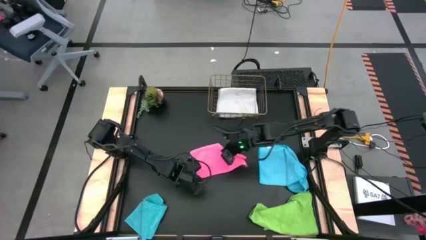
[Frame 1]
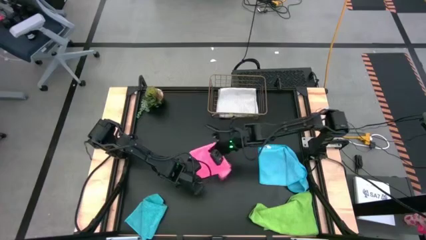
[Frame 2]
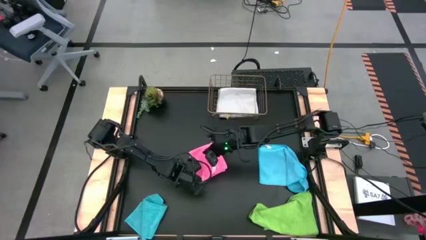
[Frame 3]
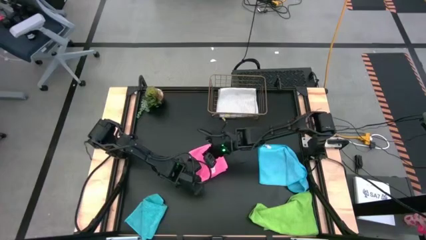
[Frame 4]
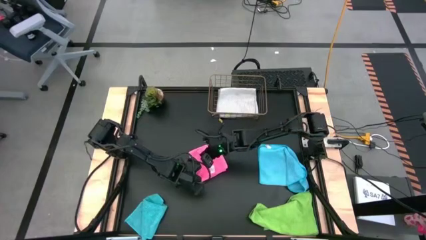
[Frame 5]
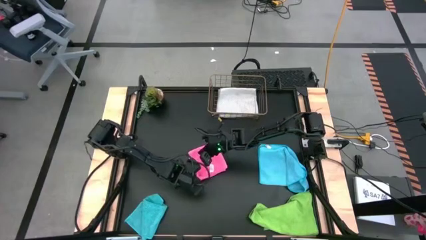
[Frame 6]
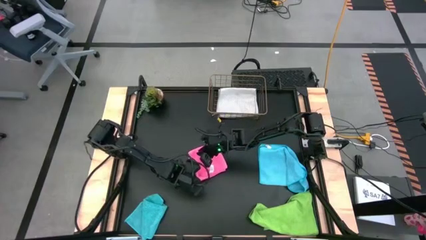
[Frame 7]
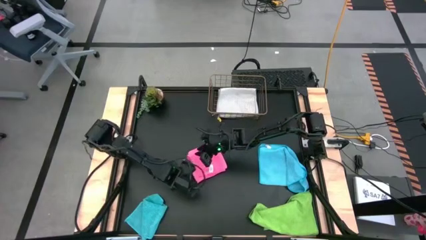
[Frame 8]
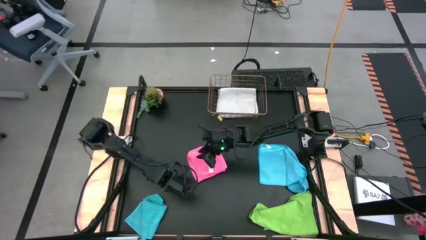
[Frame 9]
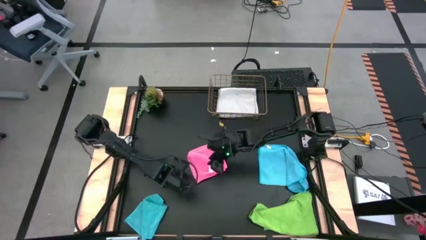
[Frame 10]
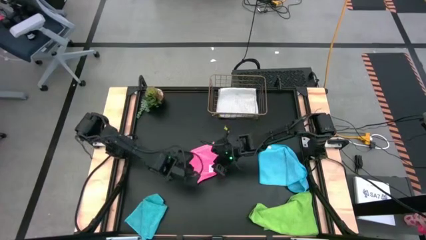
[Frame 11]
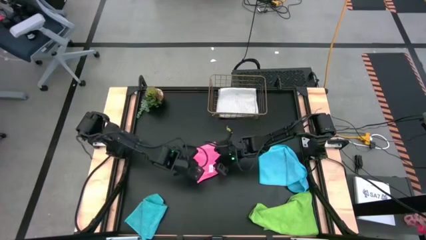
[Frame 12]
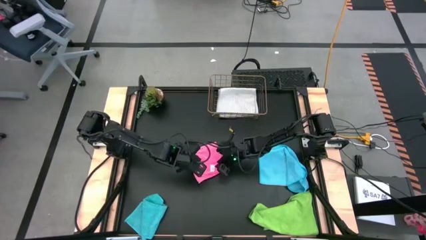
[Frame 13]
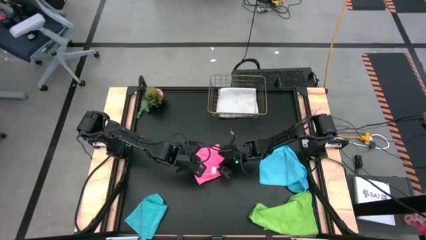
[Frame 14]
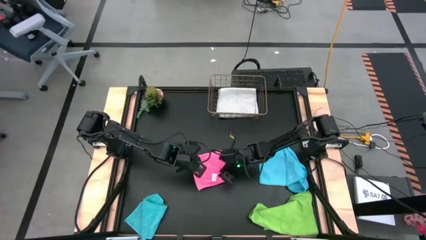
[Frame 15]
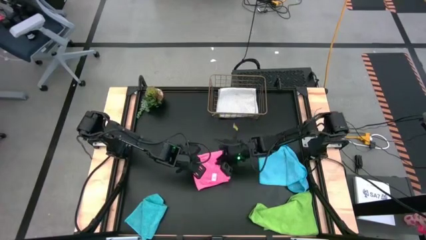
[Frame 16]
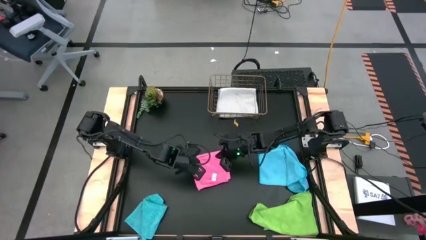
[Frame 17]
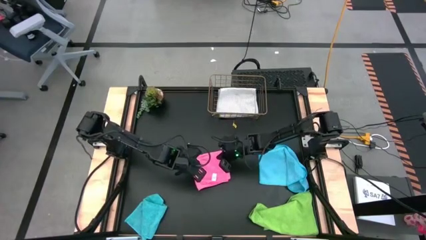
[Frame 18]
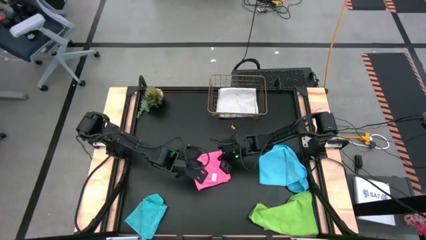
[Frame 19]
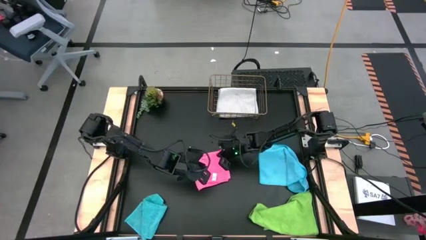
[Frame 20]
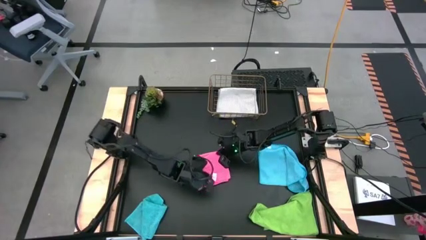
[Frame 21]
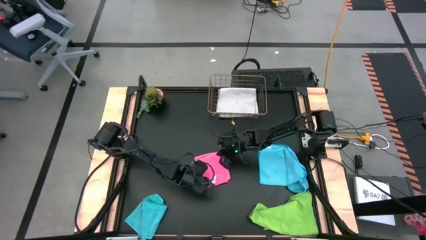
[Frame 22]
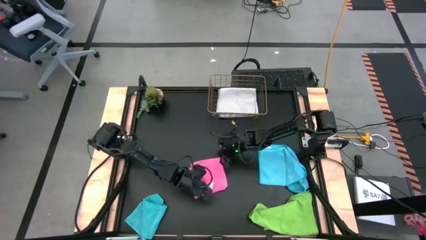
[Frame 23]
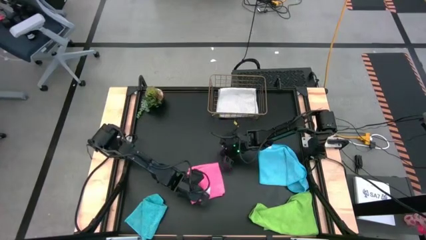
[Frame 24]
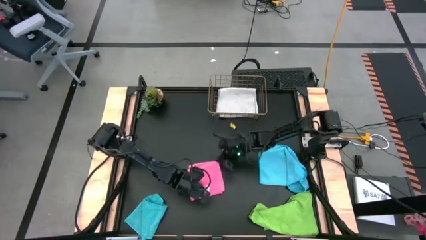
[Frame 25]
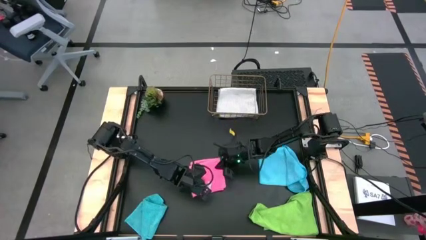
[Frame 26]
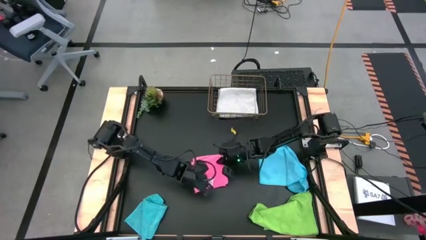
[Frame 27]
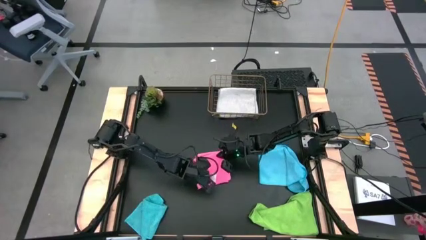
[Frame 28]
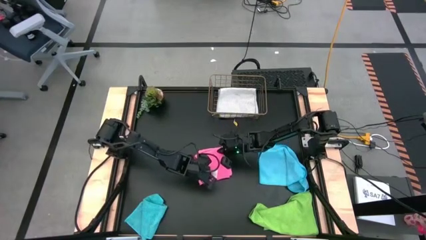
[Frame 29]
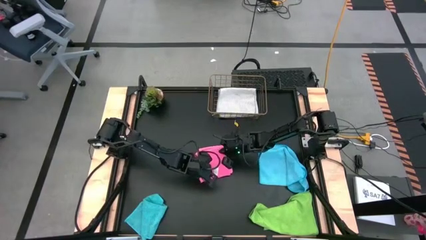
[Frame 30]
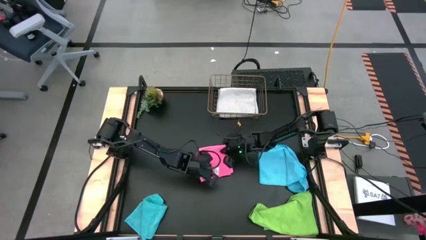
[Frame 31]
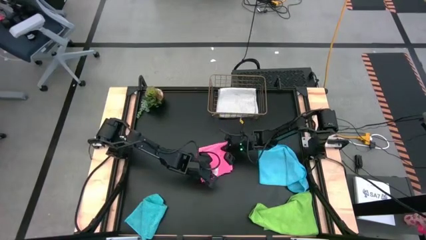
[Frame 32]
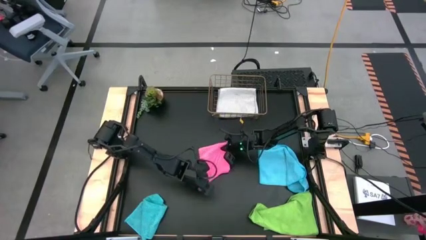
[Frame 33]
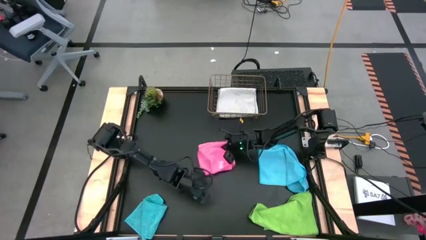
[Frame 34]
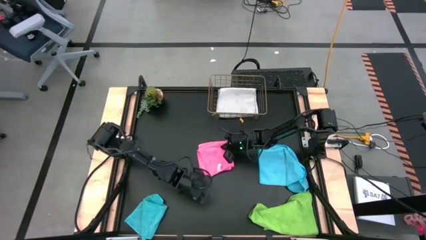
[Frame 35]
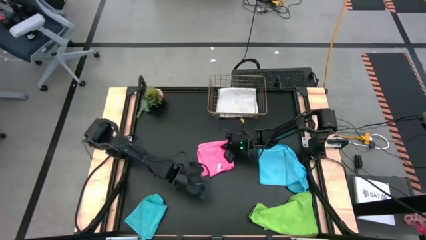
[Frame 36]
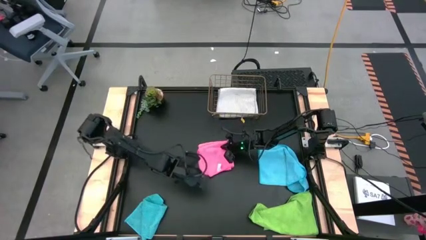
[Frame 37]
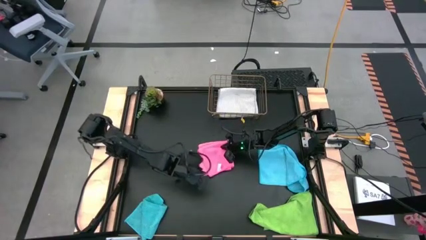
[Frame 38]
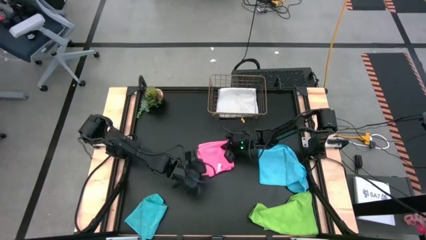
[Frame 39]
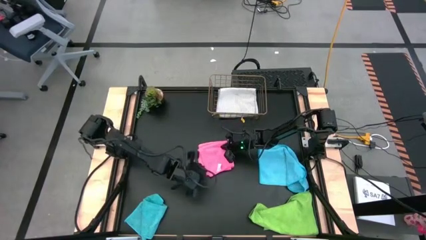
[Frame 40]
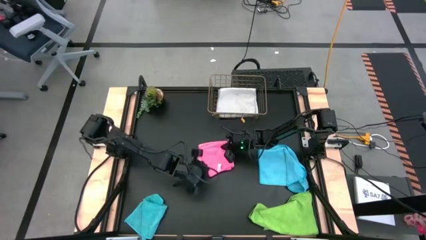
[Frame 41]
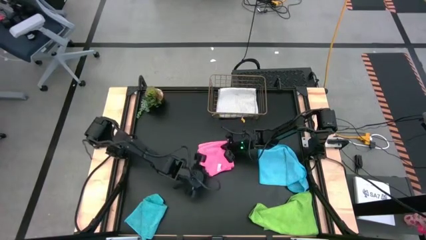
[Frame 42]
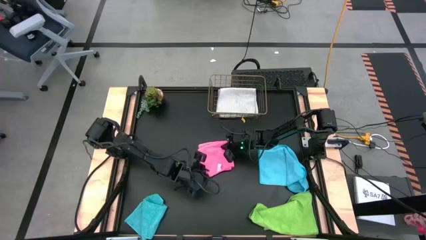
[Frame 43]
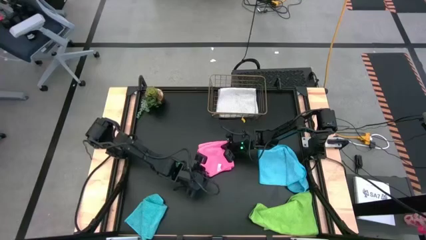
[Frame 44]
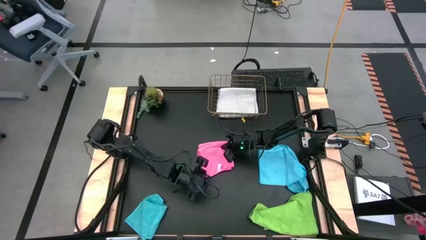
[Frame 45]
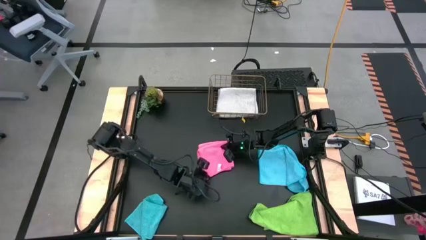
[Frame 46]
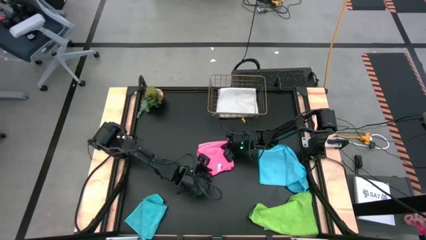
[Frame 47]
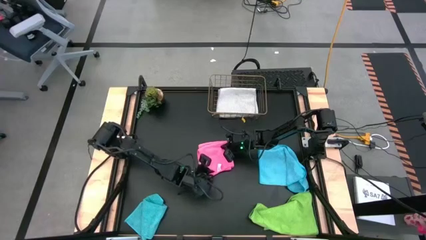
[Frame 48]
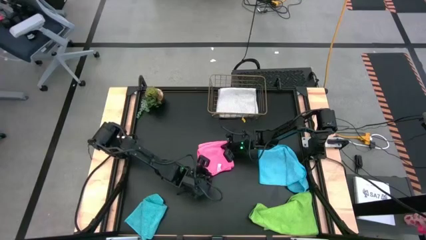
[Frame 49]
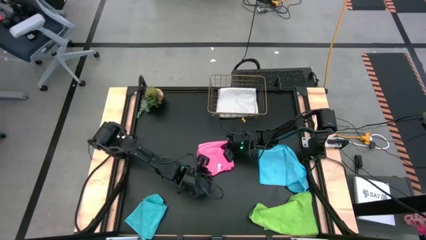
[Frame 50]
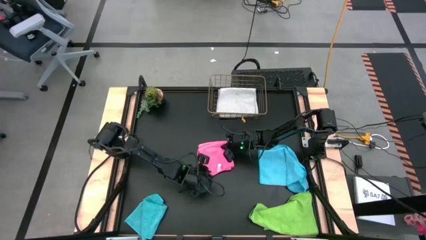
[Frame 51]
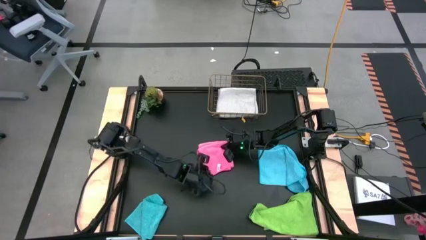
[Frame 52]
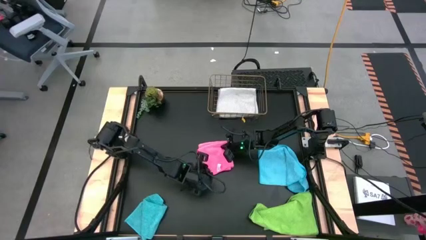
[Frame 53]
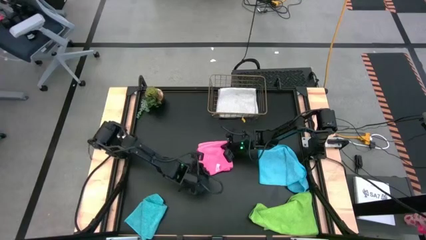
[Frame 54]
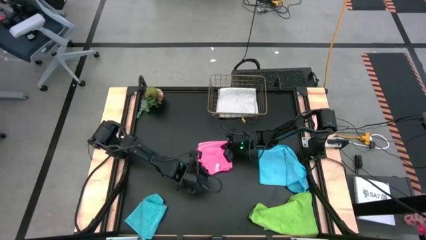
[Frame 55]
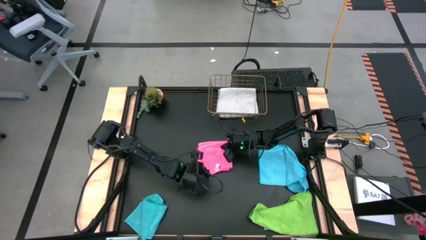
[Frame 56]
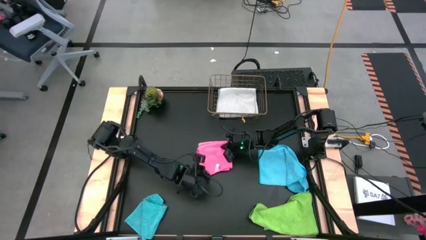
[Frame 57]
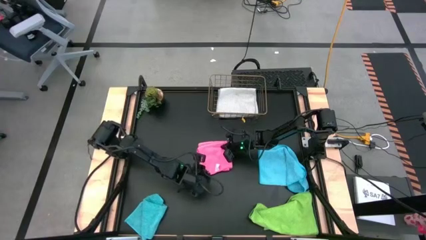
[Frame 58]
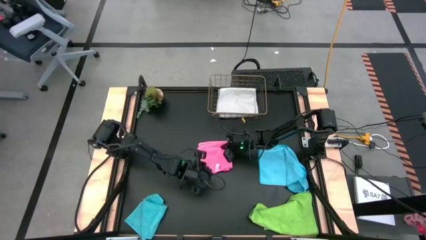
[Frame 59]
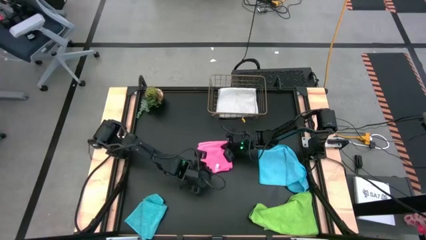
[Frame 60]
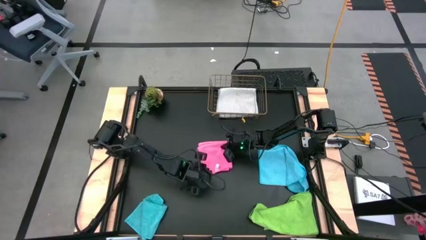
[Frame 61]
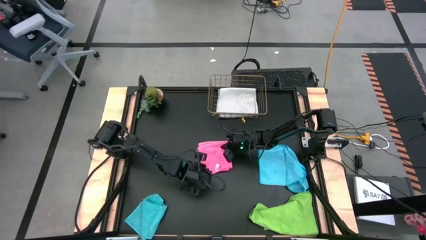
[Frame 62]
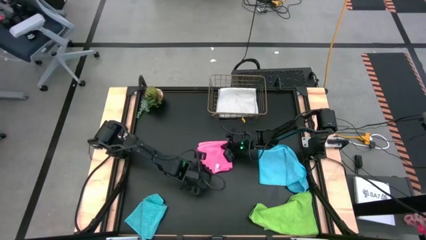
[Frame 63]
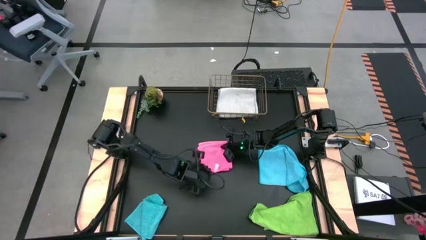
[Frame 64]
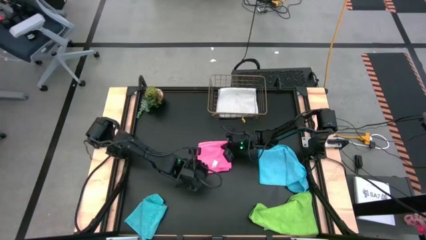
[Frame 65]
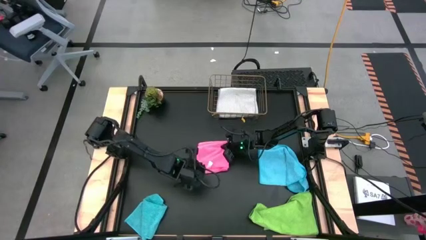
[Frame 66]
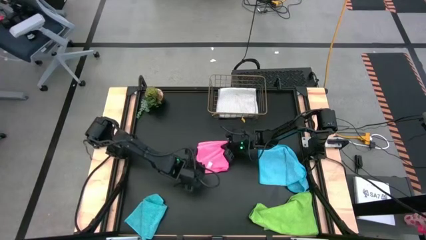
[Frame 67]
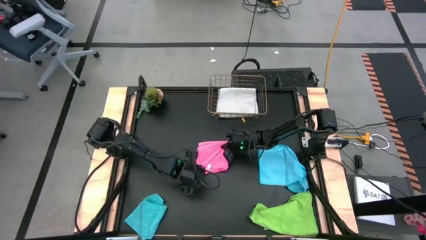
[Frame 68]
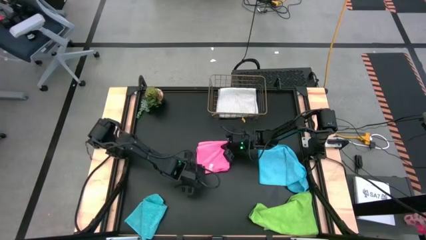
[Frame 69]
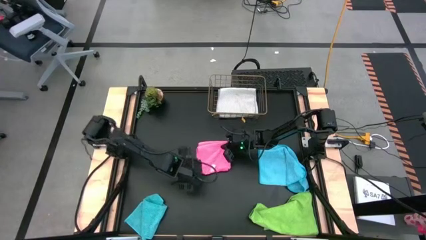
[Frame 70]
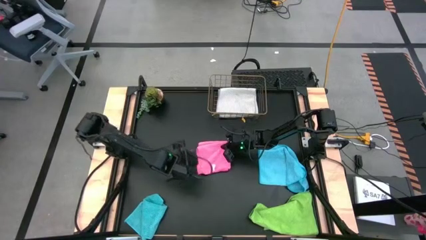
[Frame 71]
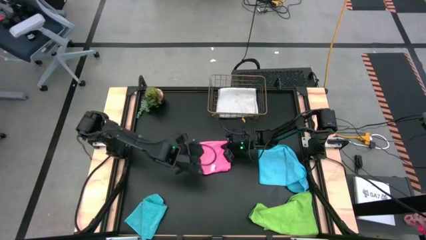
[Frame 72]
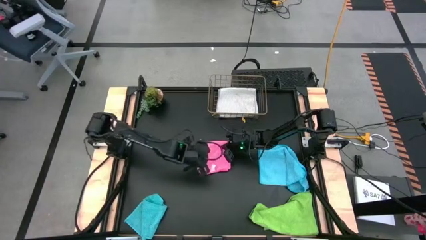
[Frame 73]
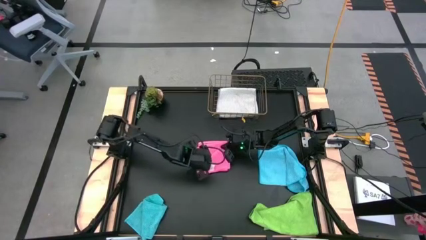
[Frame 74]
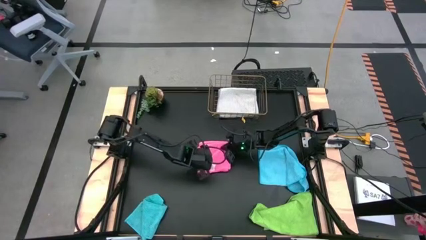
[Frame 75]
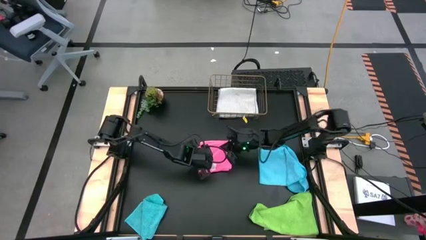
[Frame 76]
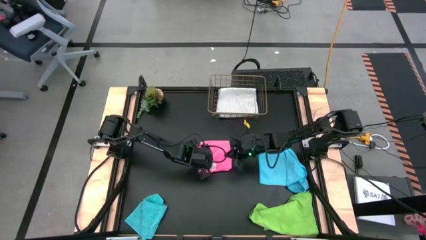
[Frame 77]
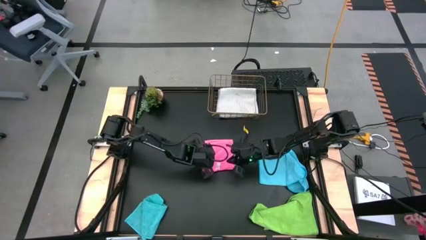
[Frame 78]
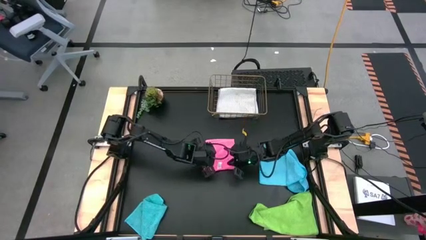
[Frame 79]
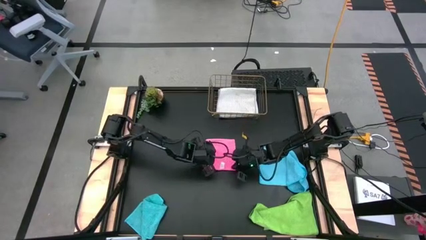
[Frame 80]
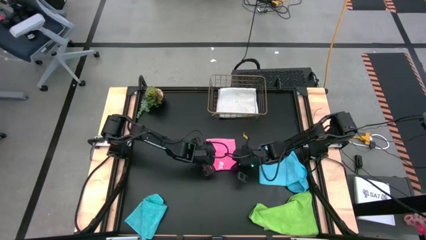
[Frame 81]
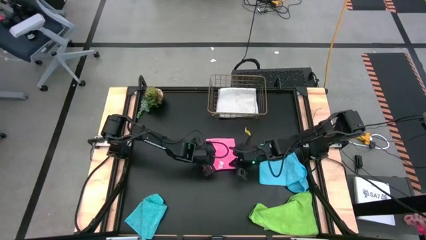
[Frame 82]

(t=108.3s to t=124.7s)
Task: Fold microfiber towels
Fold the pink towel
